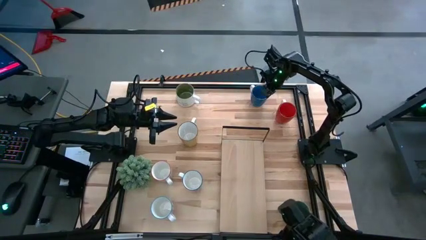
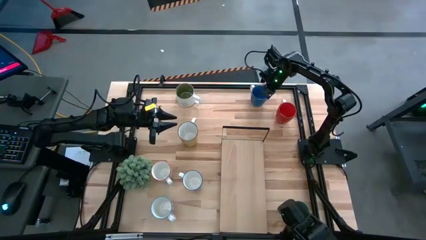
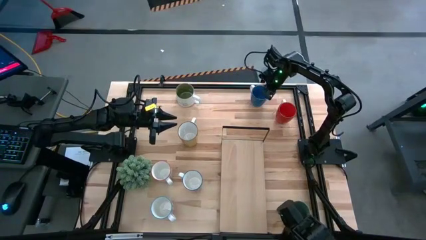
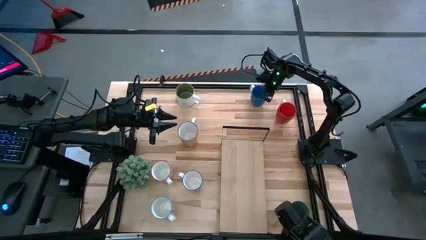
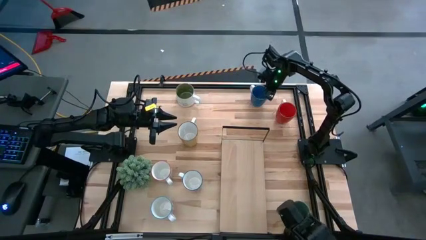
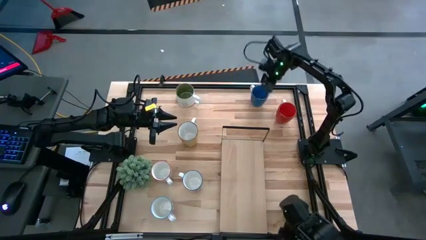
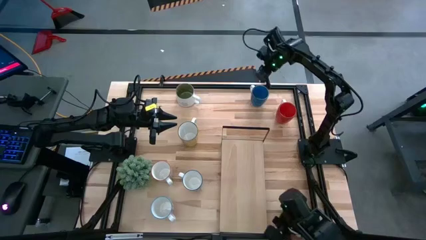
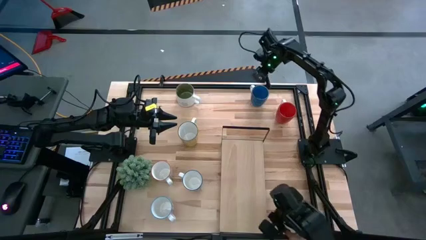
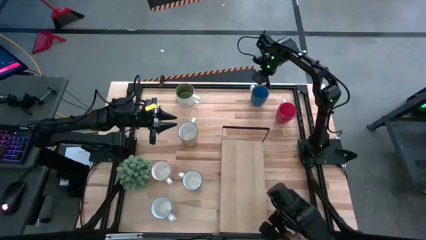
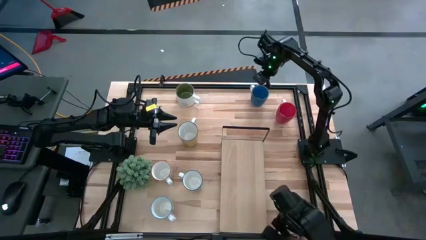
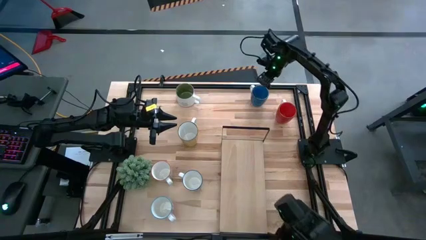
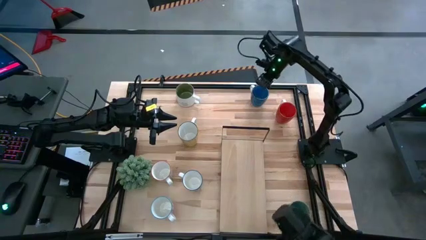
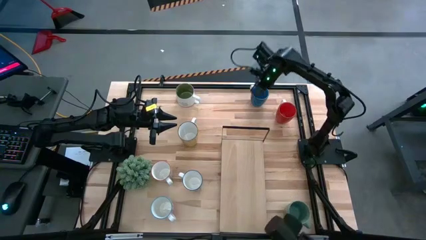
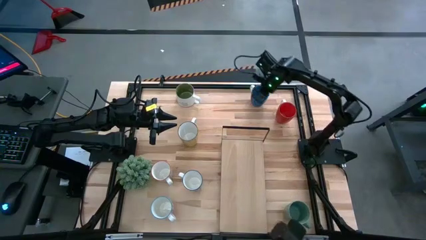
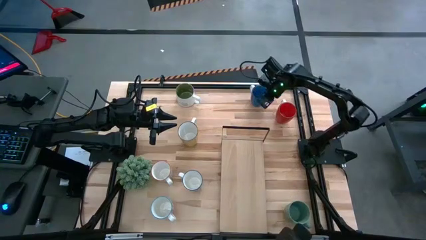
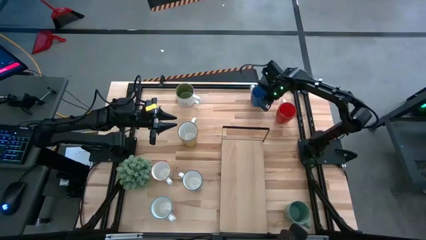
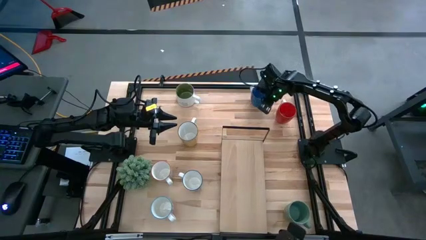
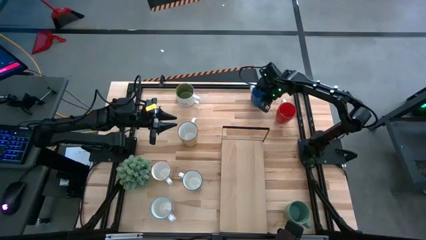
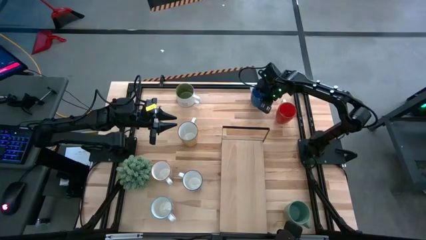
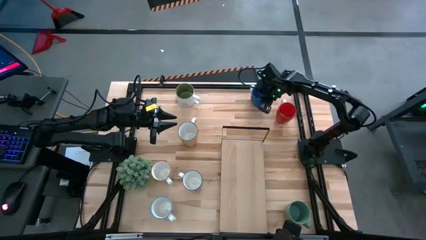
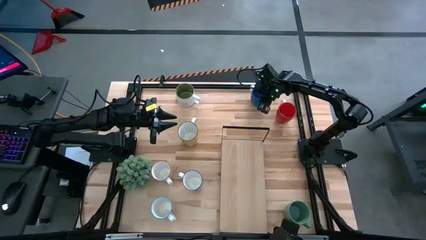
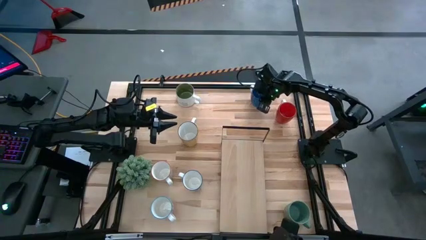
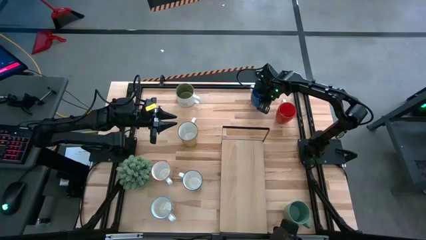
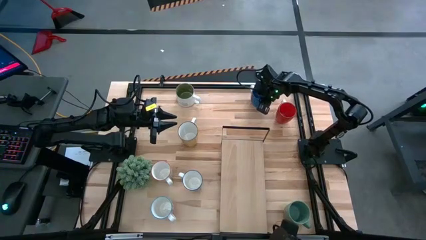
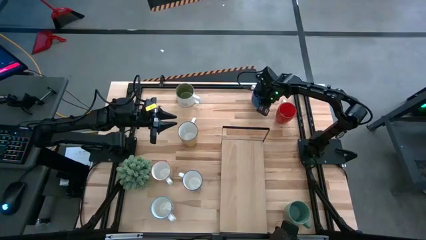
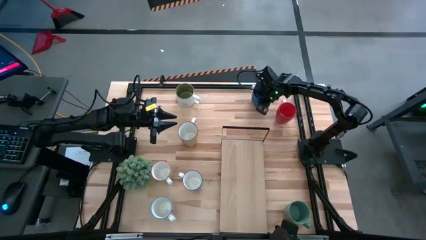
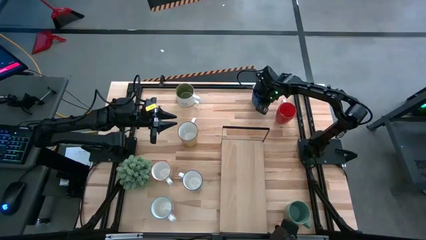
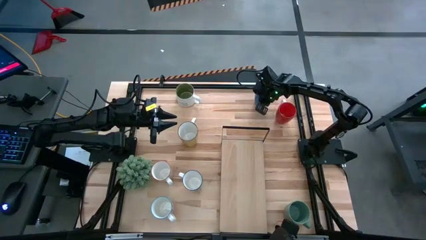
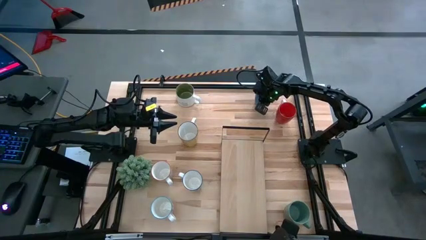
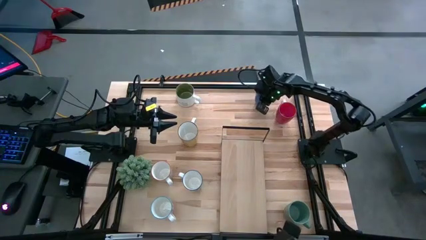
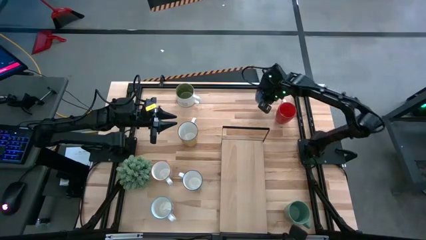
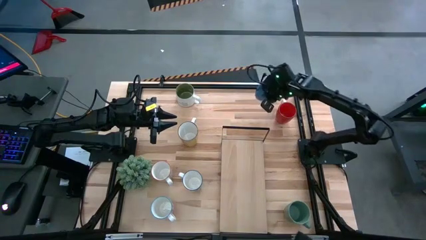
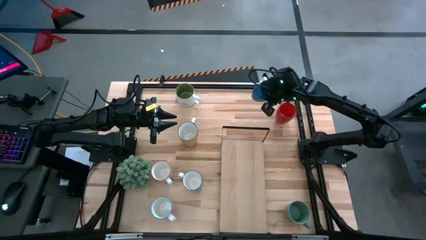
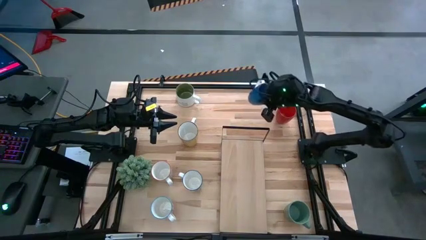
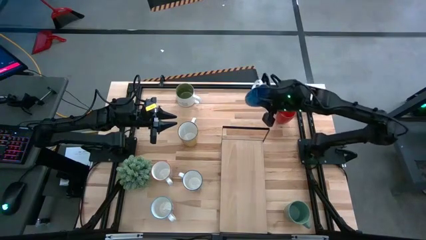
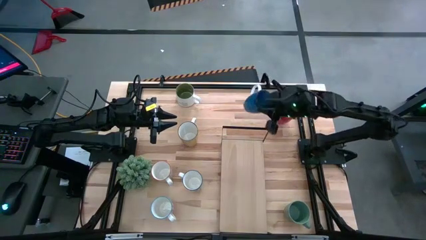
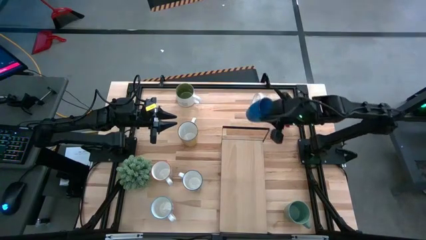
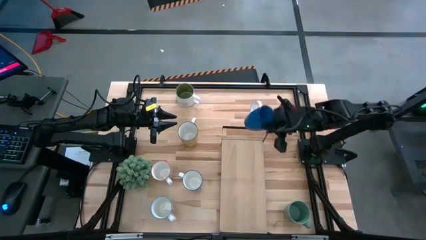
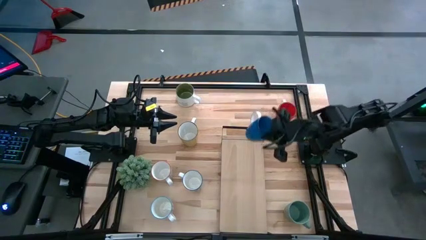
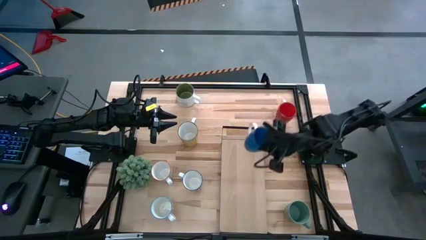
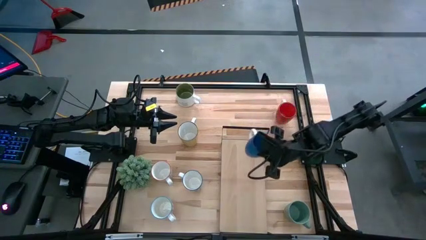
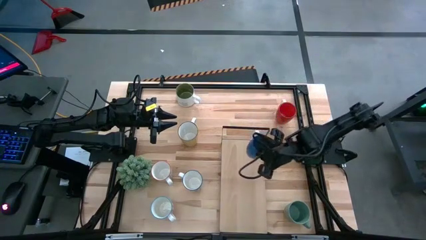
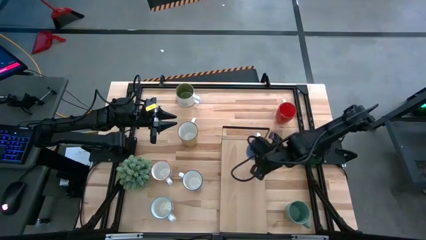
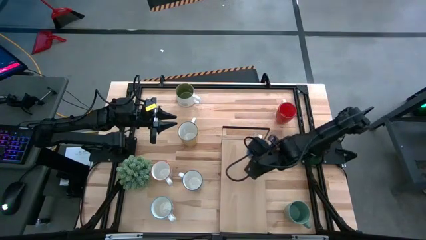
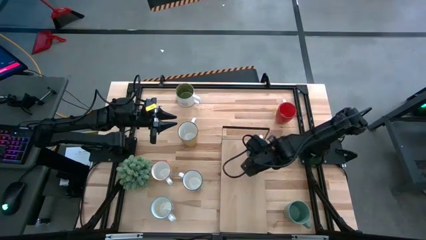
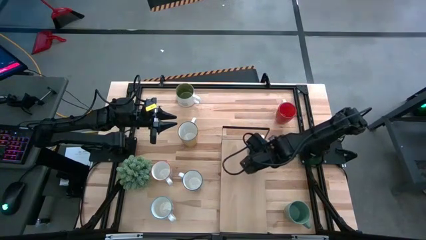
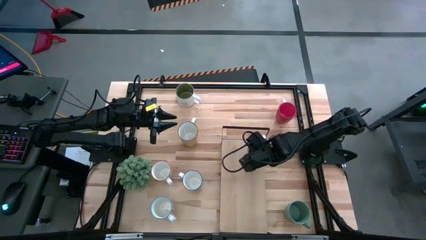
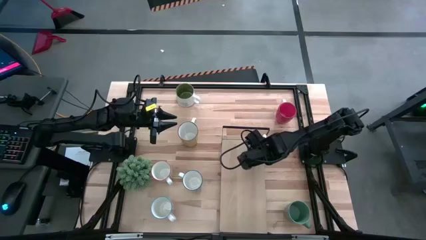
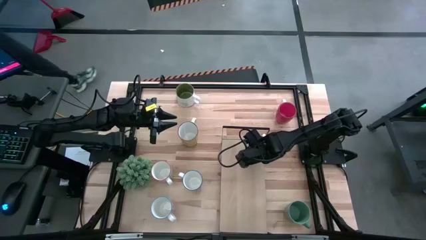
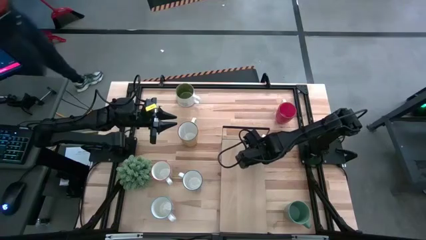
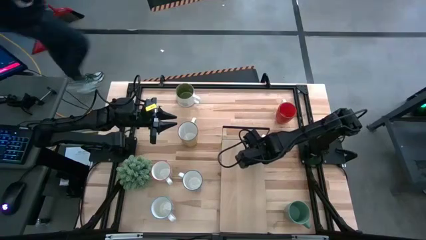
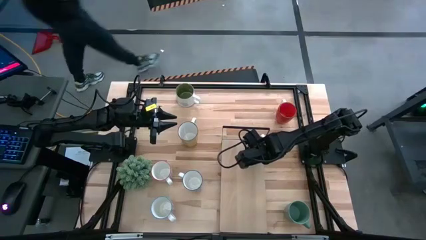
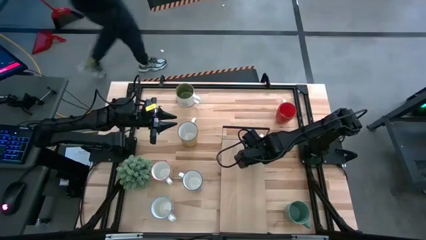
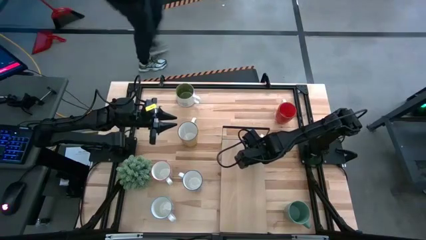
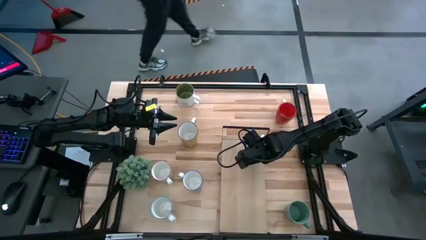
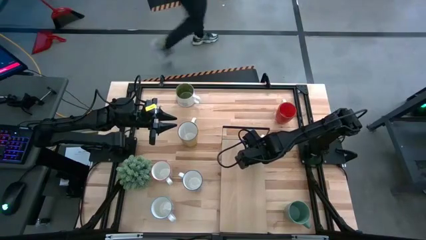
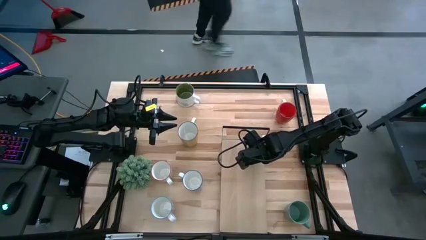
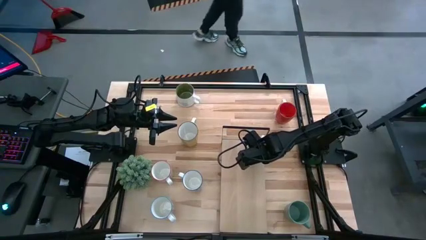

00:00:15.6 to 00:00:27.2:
Task: Place coffee mugs
Put the blue mug on the shelf
